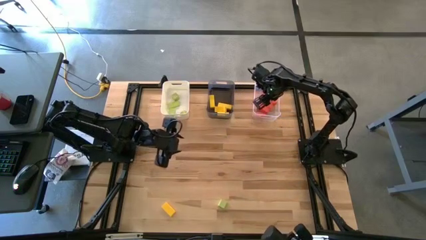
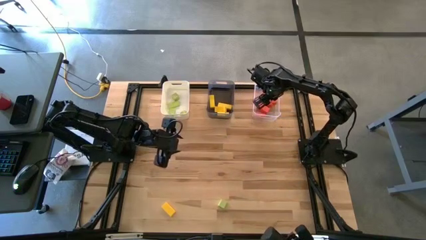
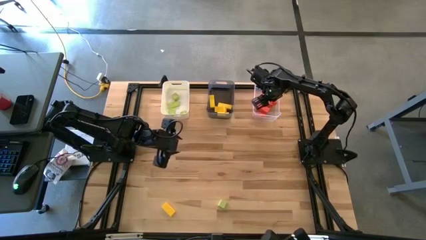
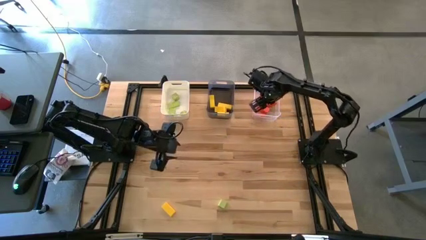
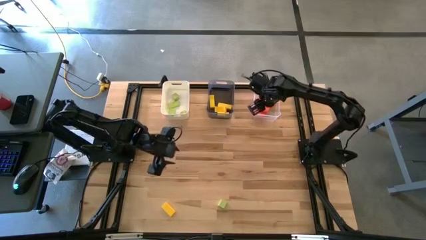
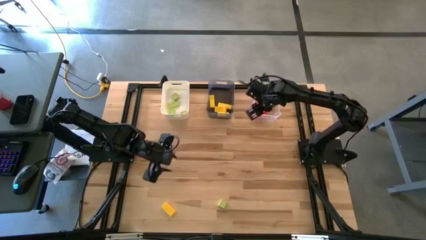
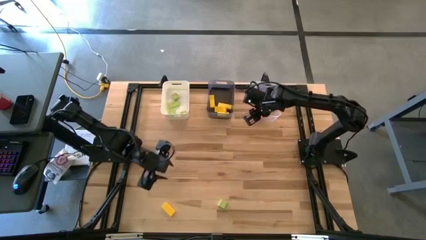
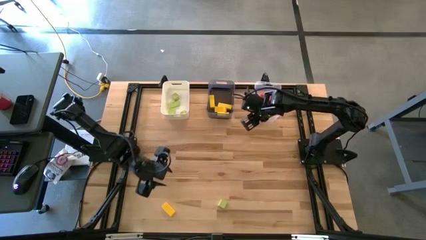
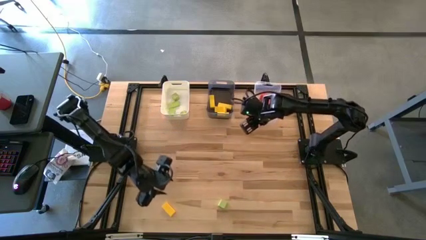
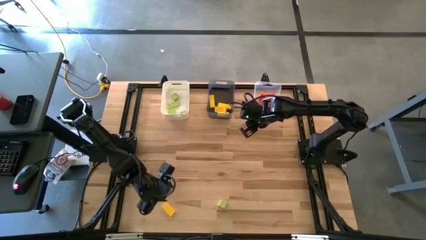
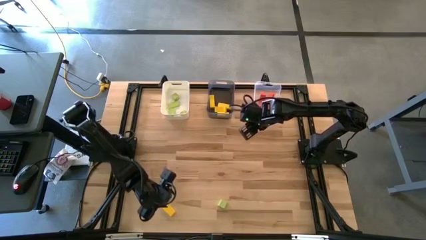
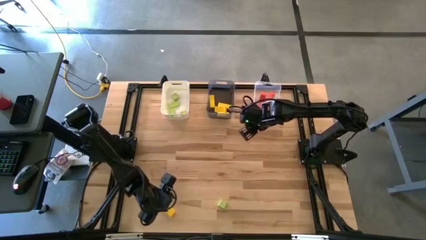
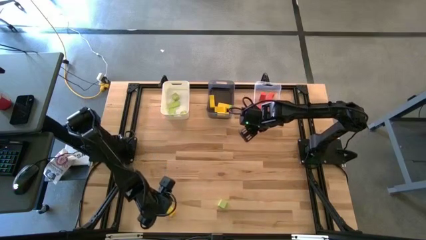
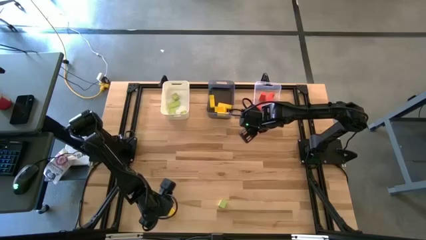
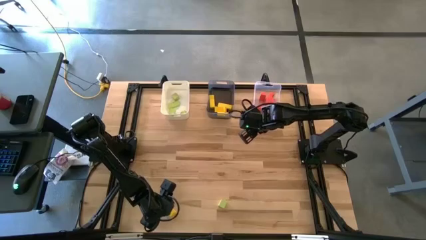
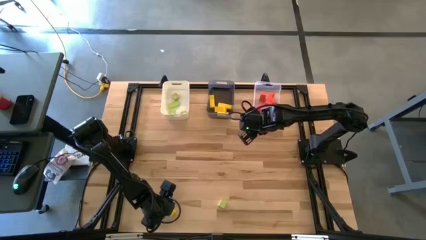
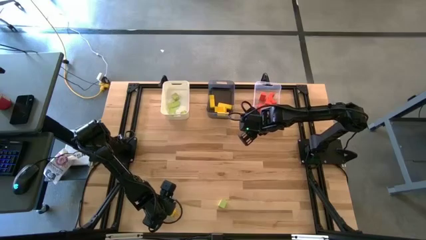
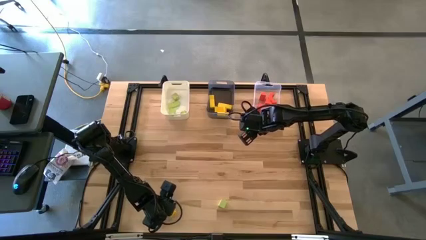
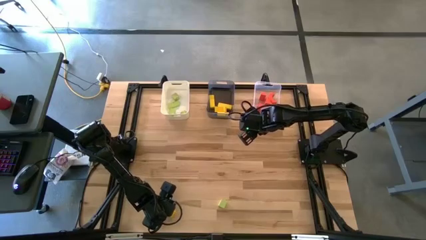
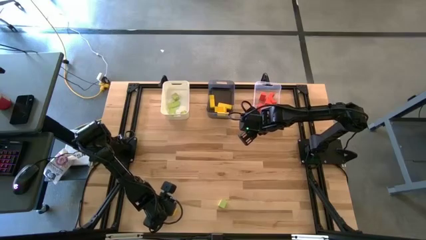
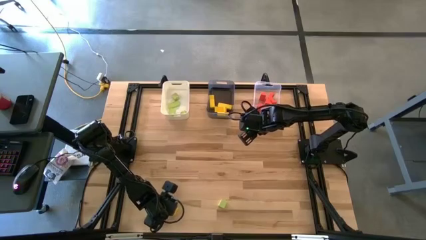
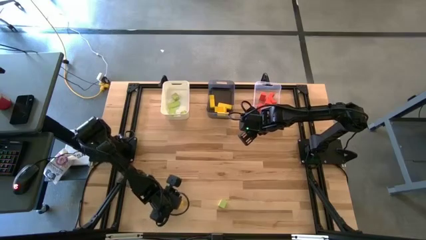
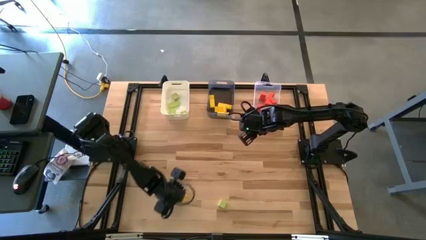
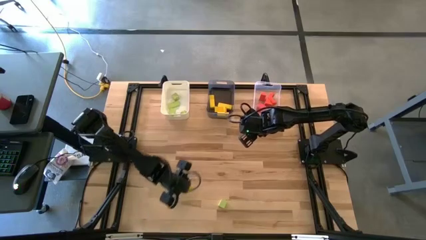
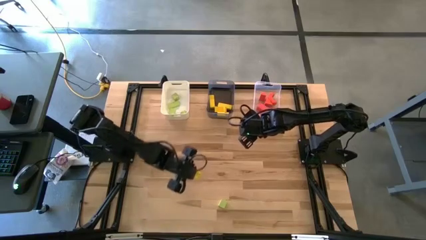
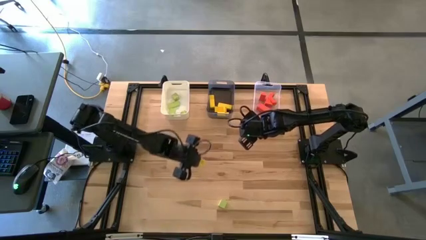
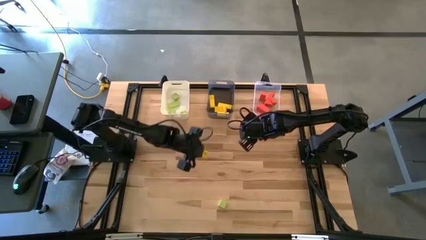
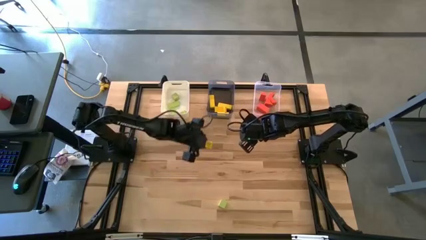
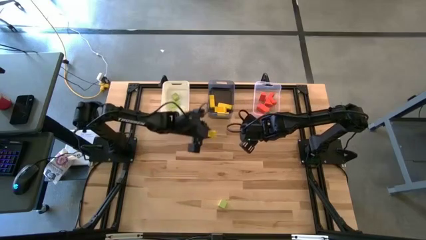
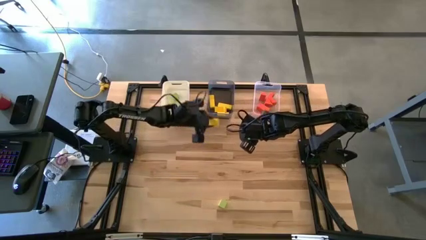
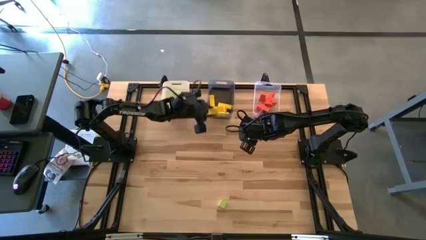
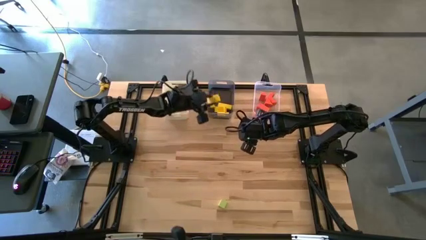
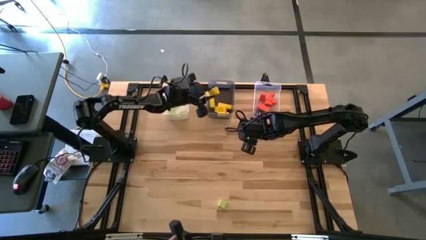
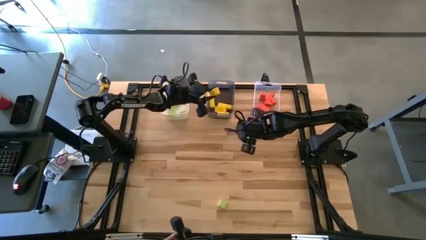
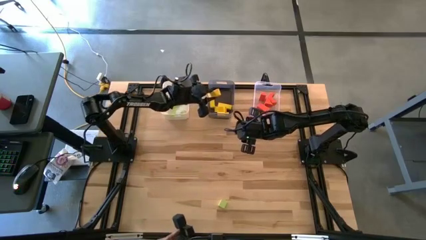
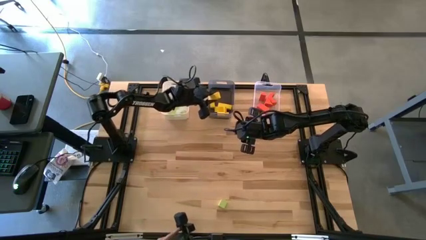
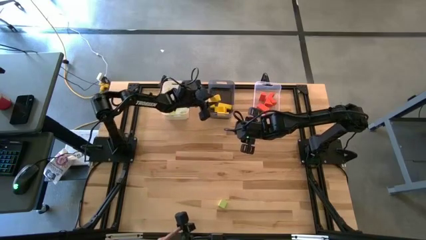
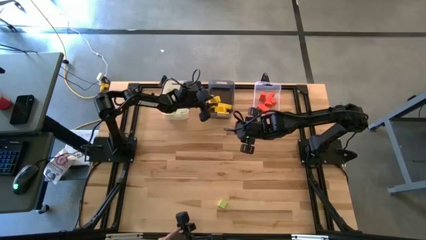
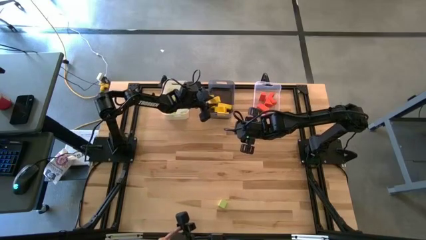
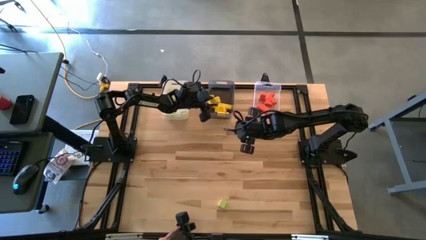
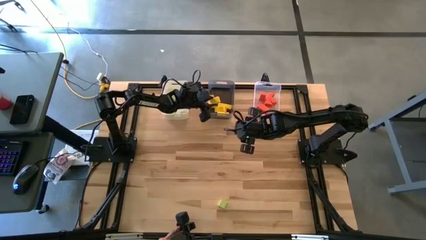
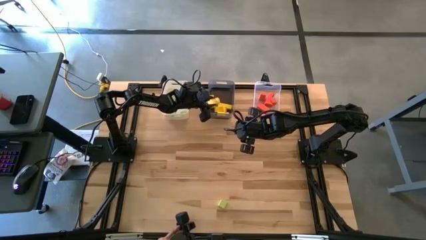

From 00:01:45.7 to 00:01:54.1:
Task: Sort & place blocks by color
Put the yellow block into the black bin

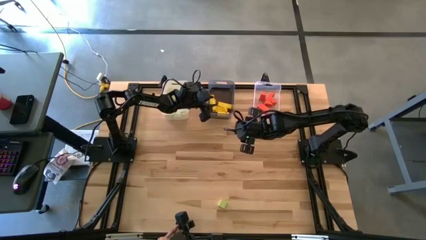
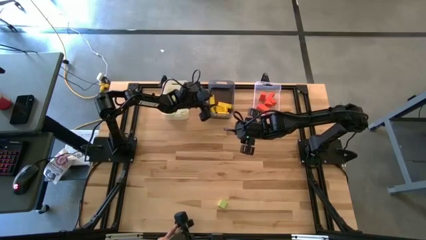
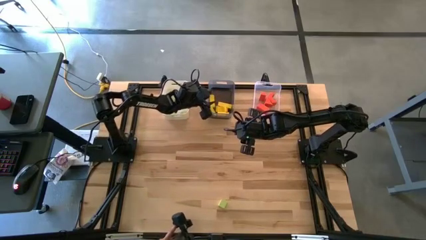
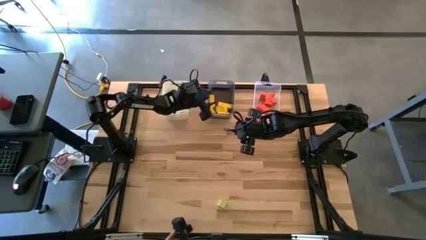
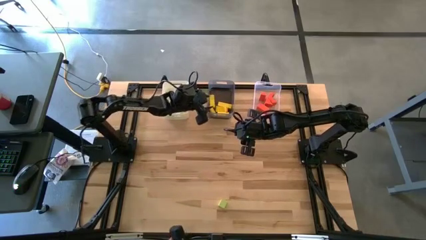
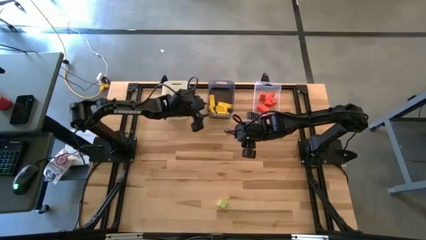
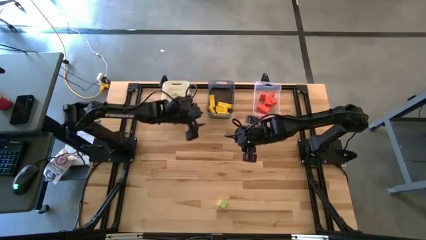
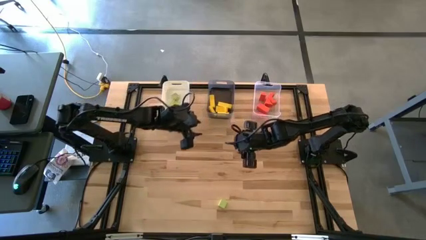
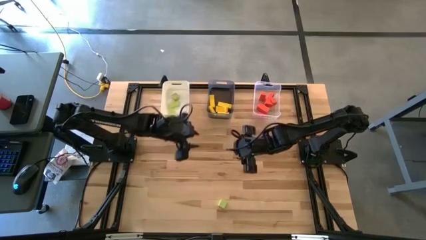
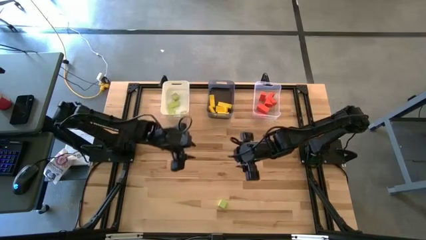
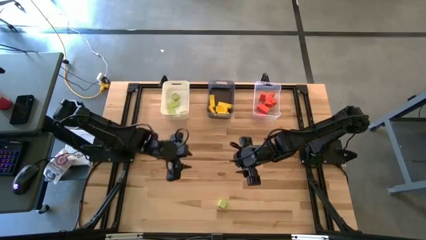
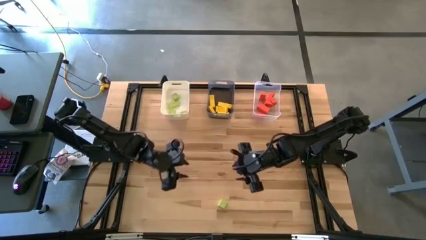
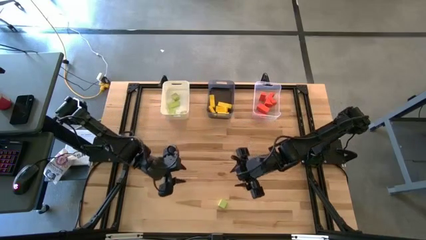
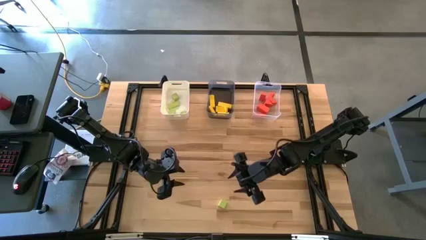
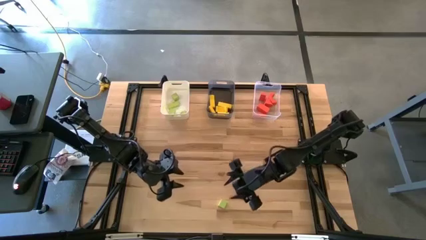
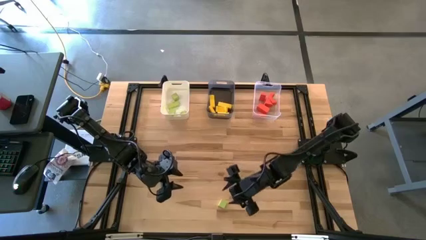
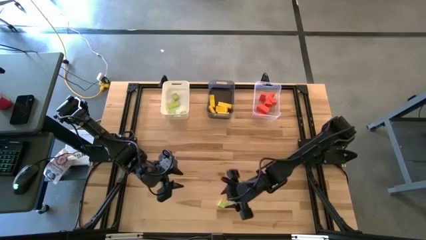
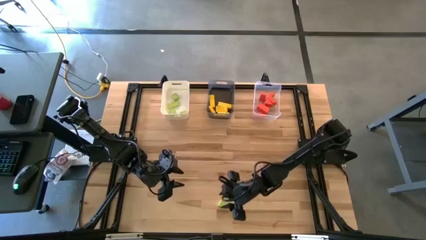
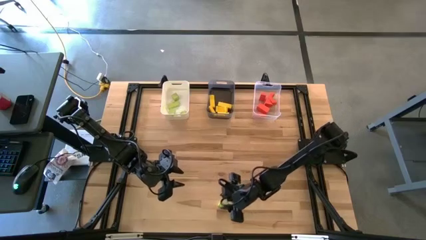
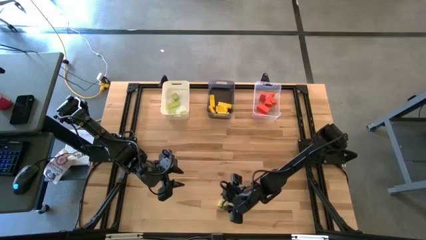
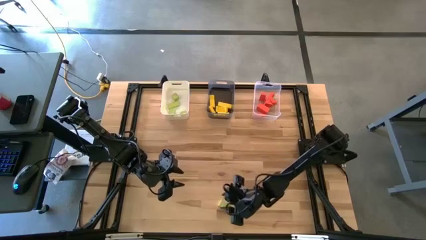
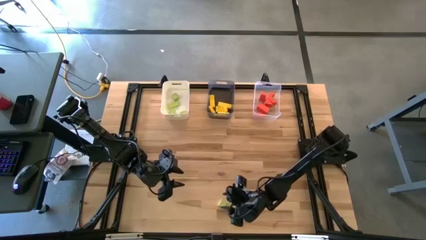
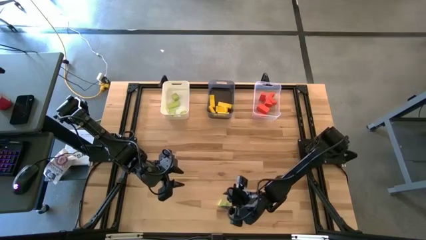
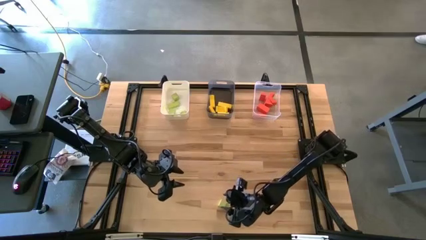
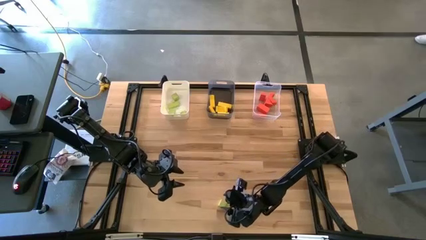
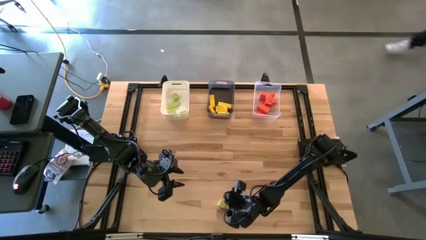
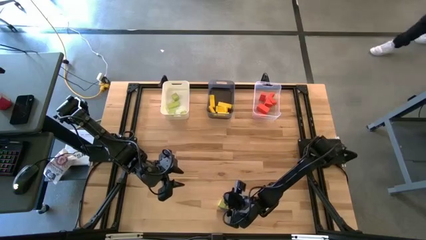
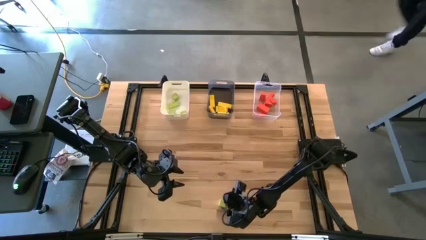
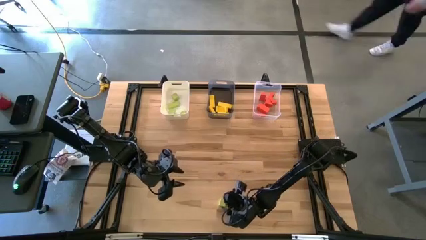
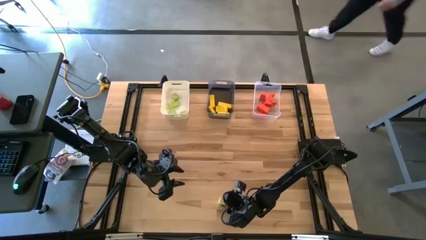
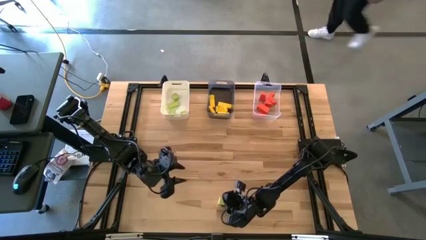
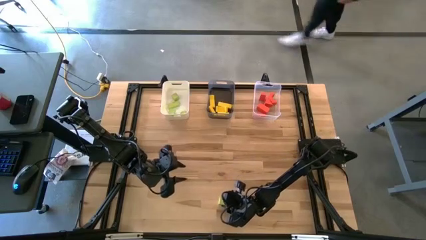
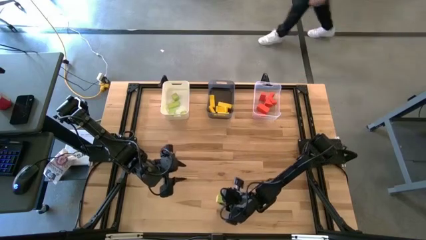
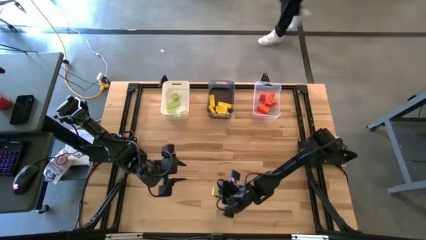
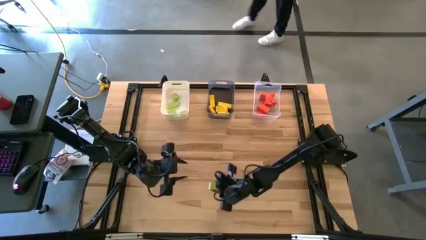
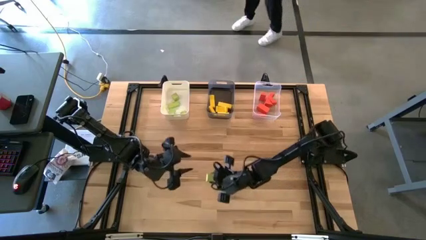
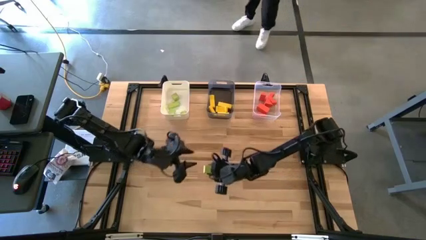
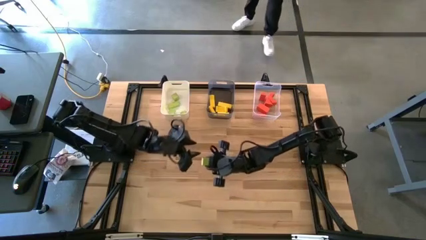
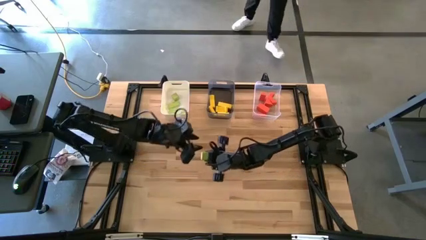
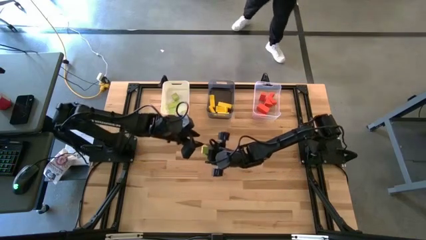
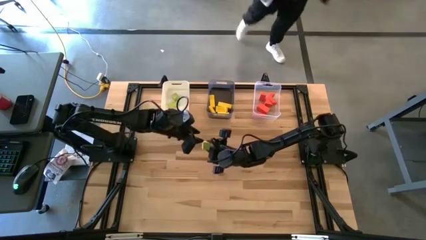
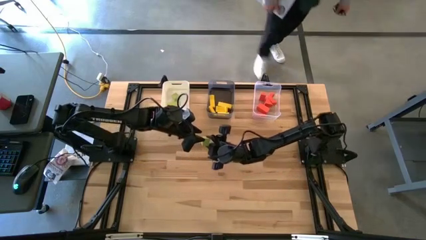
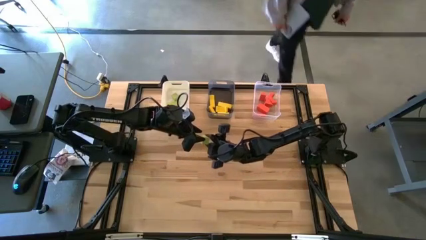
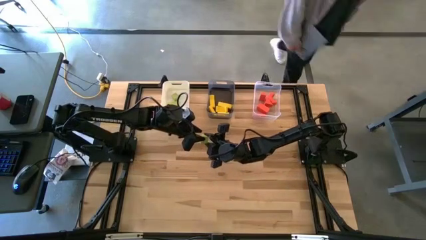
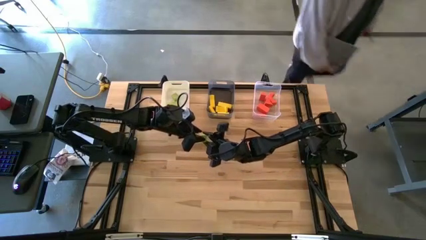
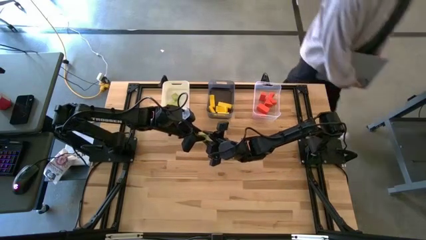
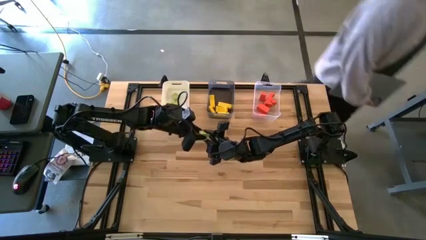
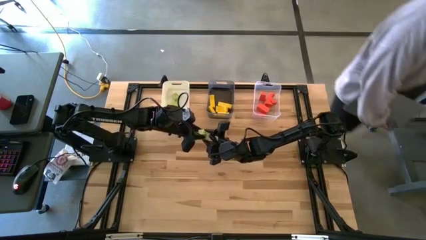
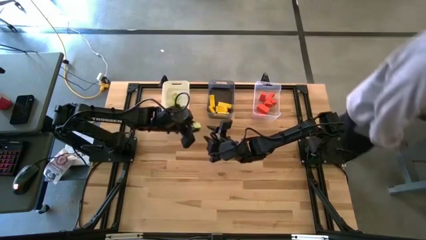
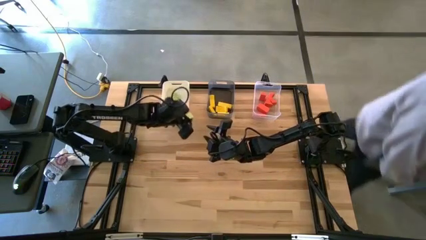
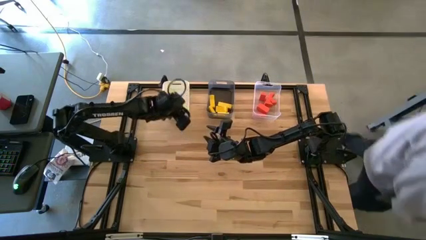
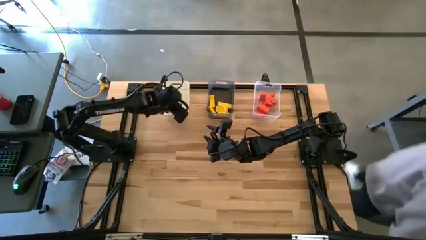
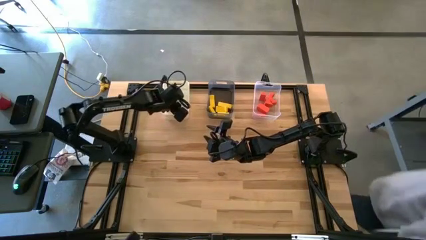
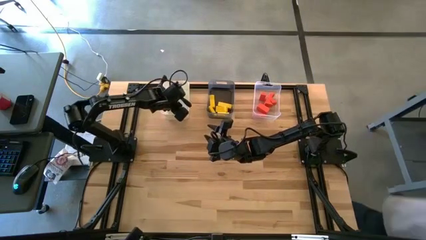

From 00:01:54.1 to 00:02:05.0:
Put the green block into the white bin
